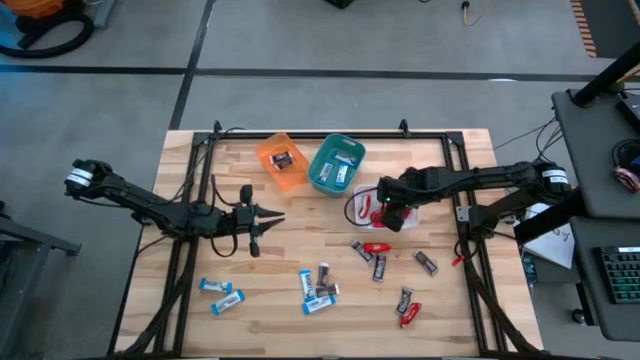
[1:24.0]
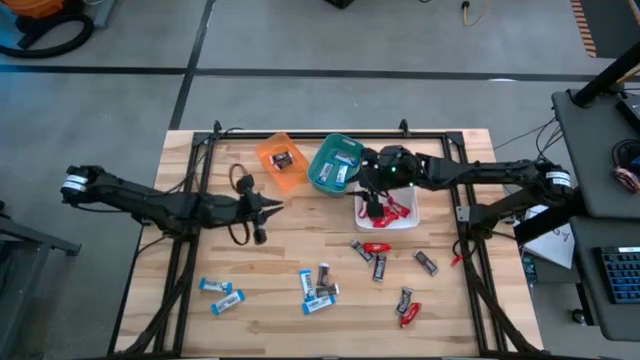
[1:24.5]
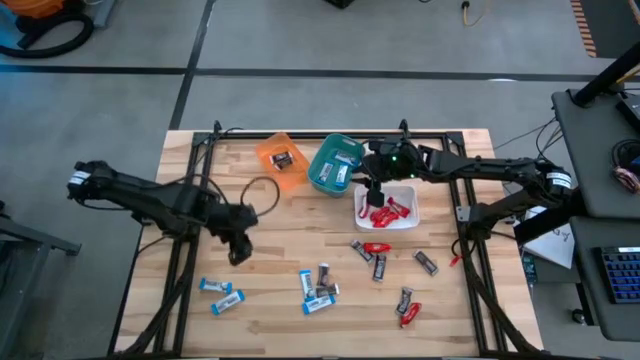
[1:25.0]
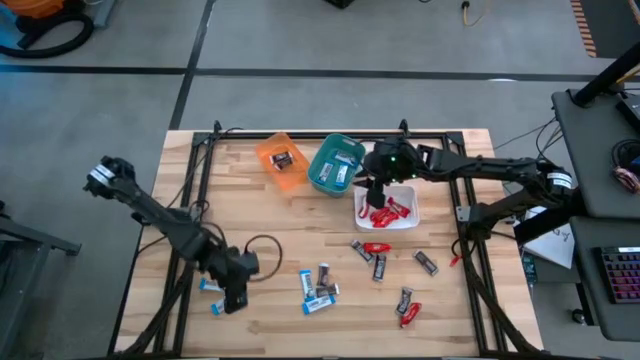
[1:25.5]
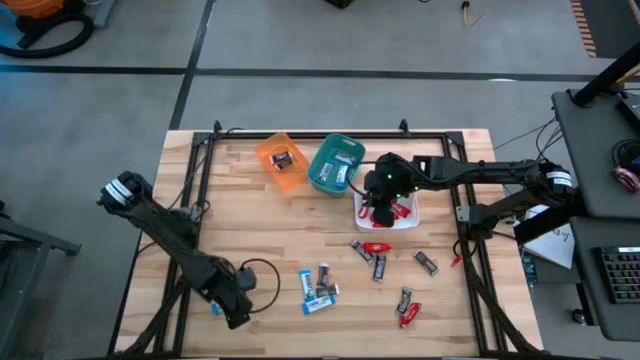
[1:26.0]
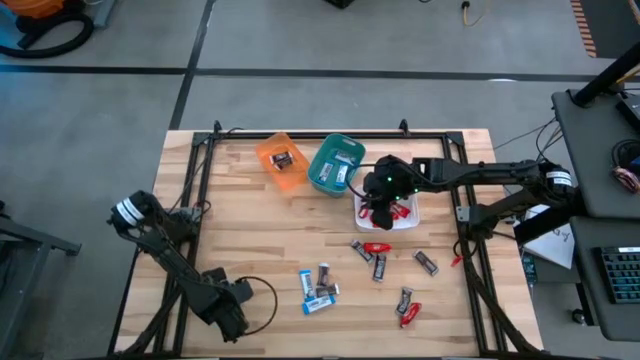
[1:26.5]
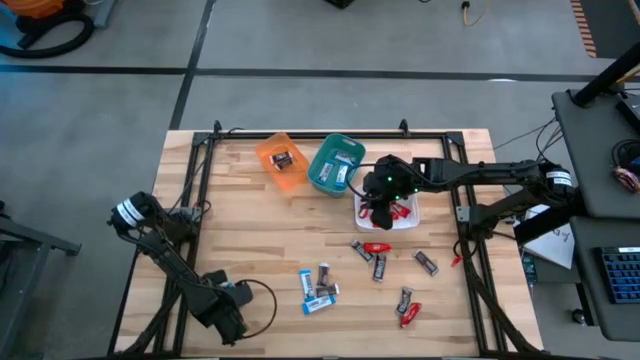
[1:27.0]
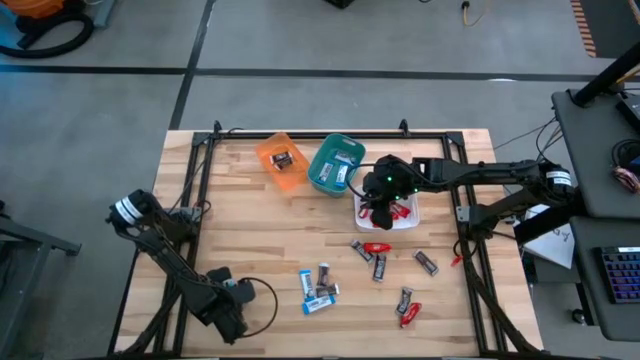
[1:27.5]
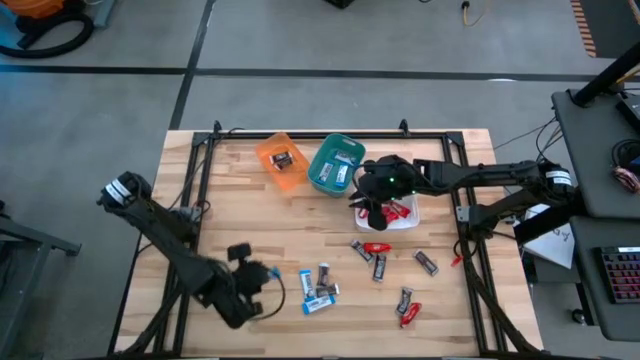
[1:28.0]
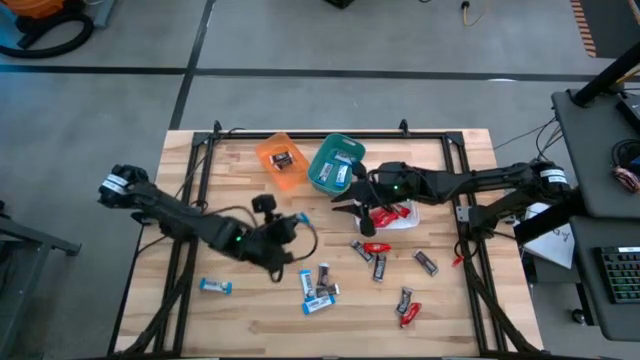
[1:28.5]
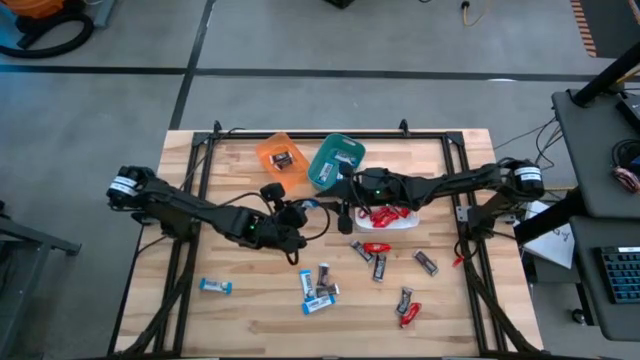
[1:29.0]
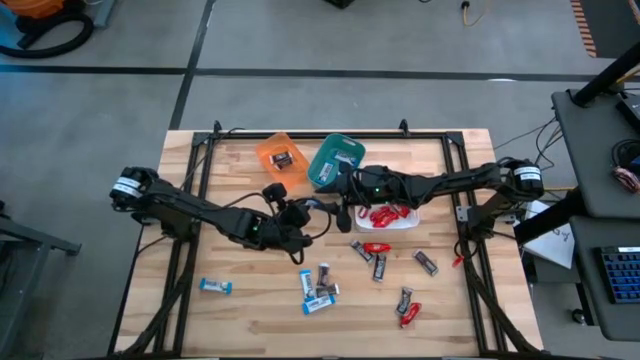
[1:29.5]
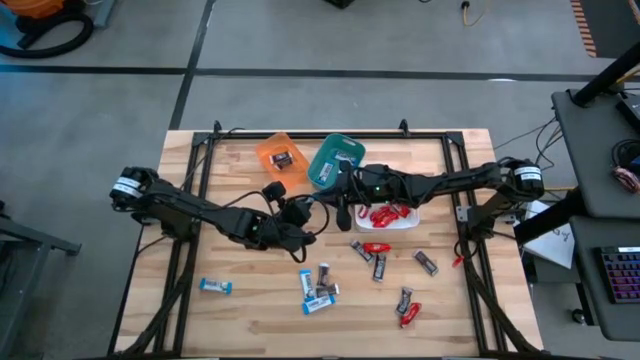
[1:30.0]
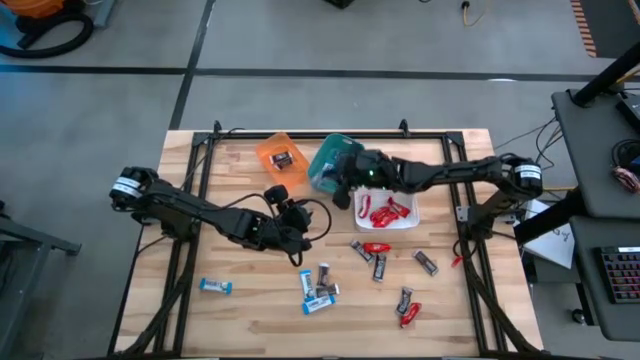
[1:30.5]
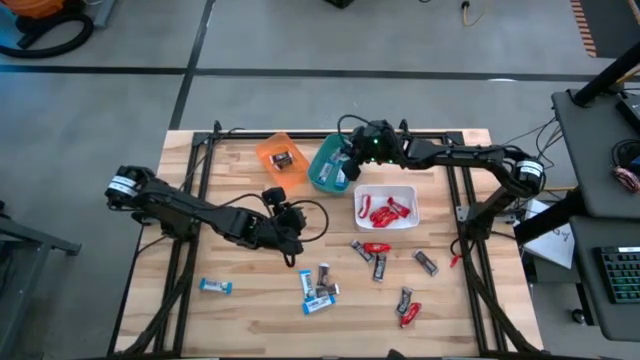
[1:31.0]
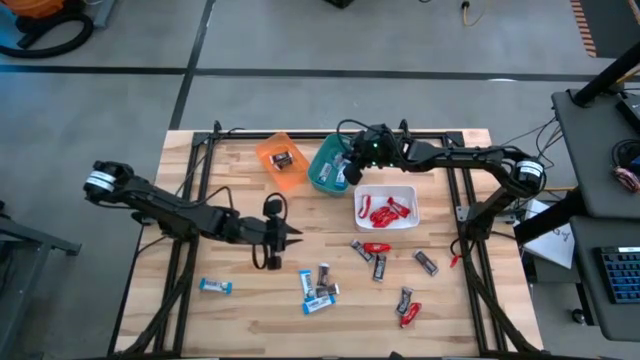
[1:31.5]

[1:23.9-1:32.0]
Task: Sort candy
Put the white chocolate bar into the green bin

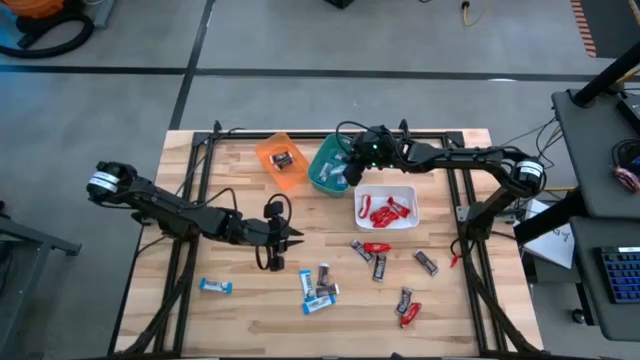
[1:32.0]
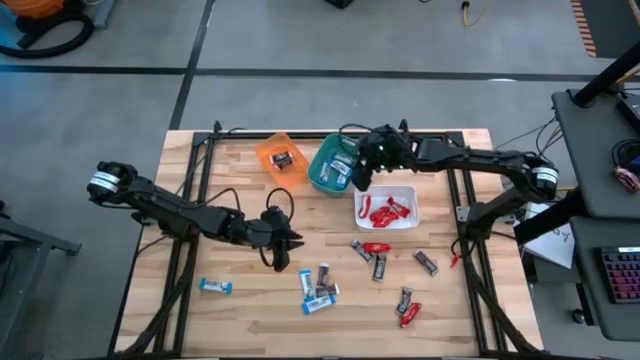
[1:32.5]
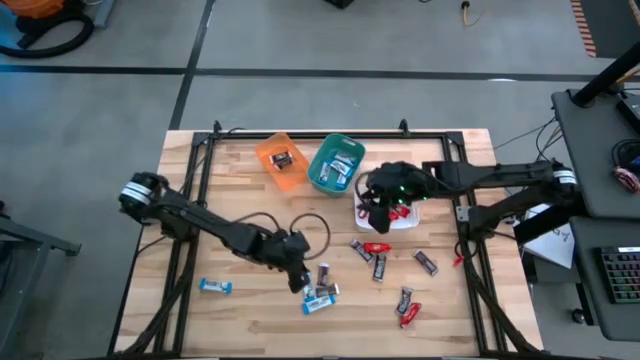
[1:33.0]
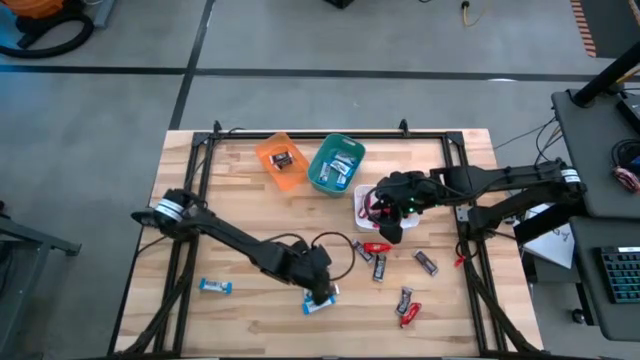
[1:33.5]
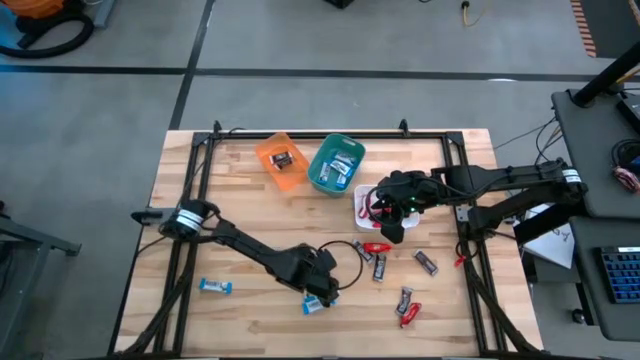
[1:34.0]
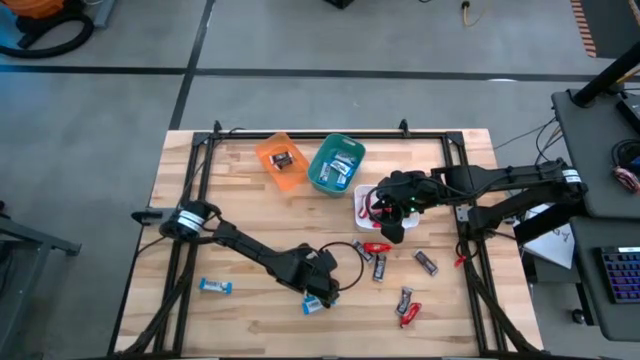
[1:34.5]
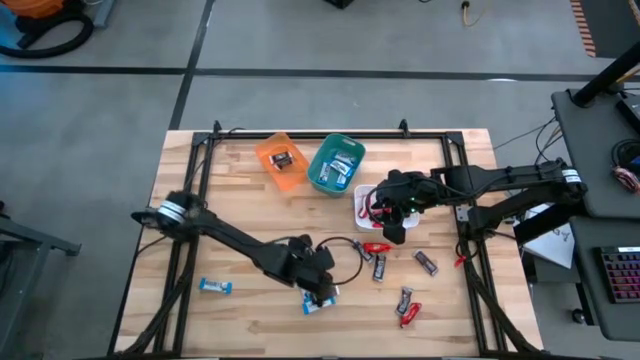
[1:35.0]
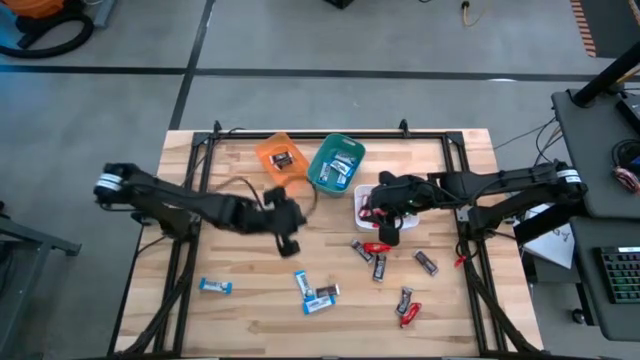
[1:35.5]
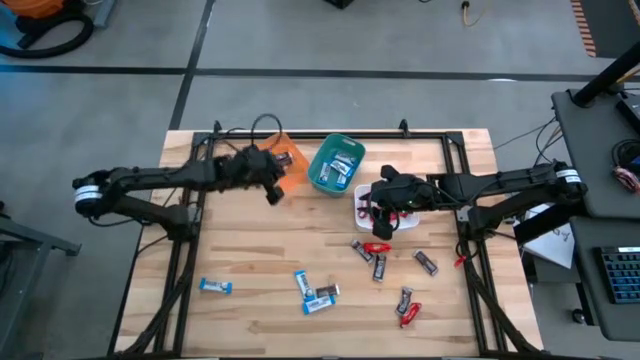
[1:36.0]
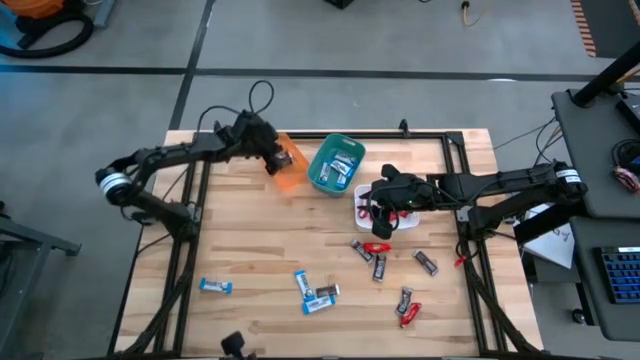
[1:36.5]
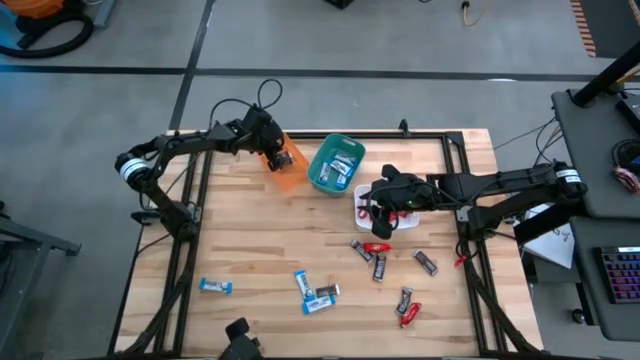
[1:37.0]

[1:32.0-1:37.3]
Put the brown chocolate bar into the orange bin

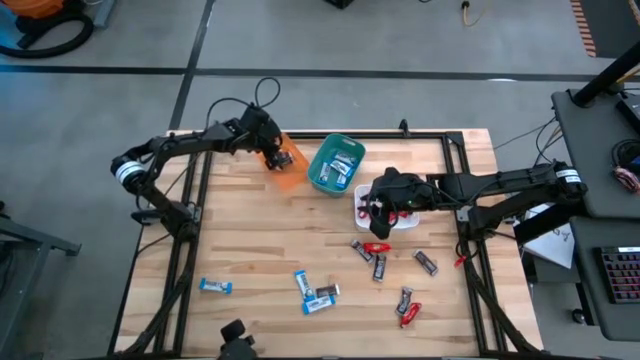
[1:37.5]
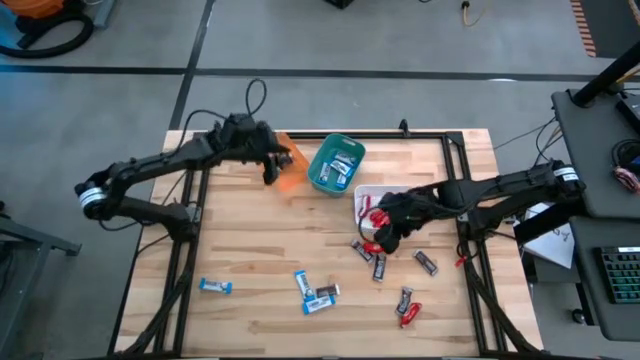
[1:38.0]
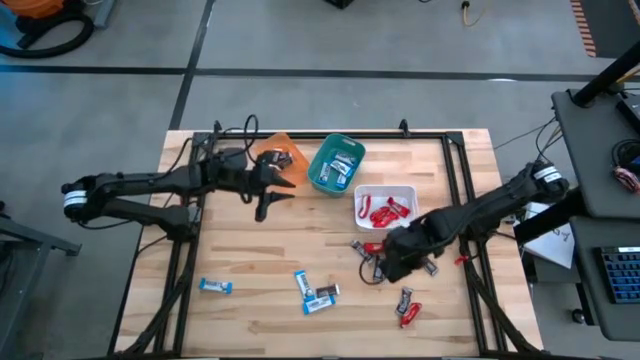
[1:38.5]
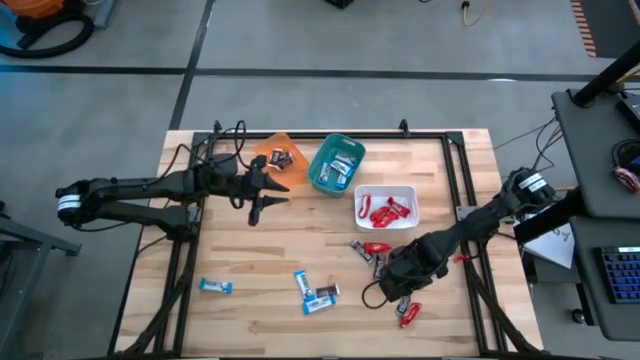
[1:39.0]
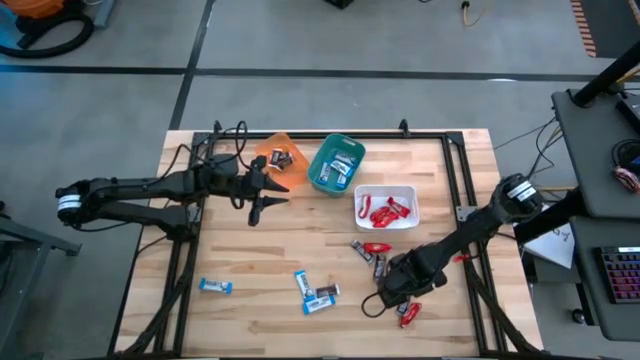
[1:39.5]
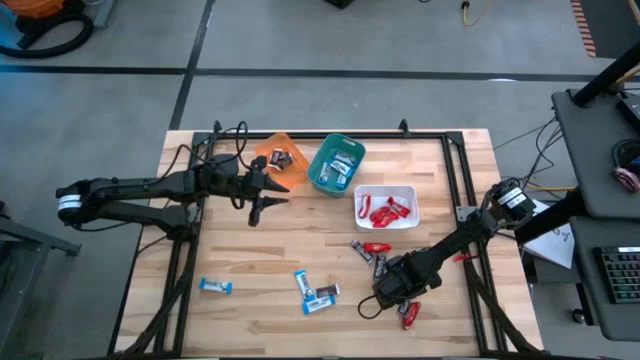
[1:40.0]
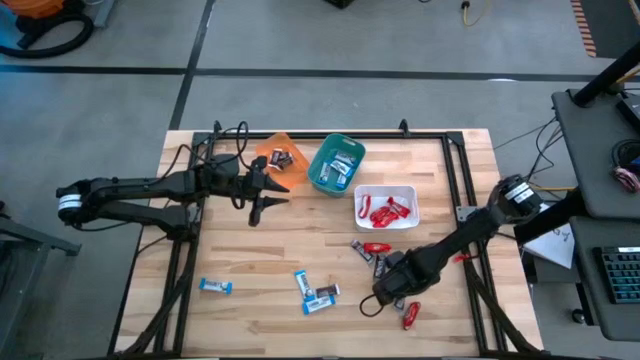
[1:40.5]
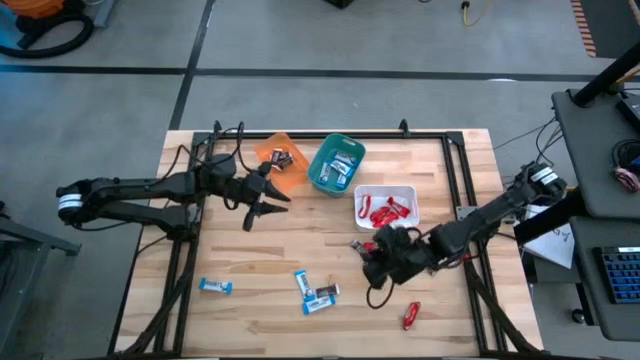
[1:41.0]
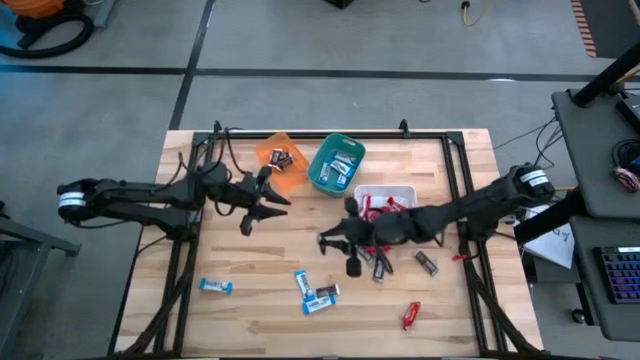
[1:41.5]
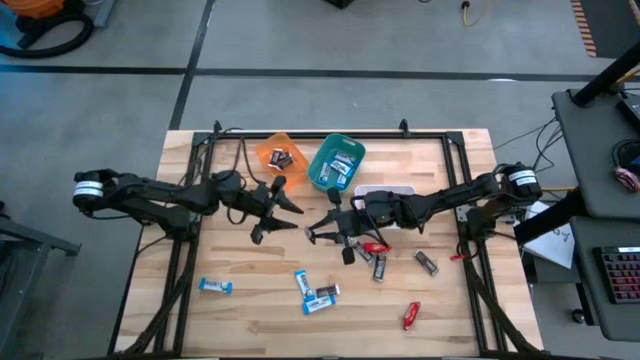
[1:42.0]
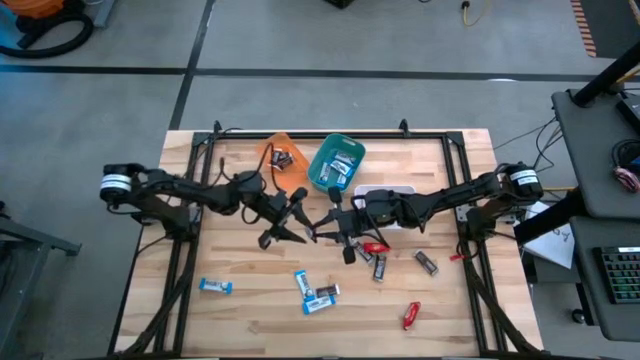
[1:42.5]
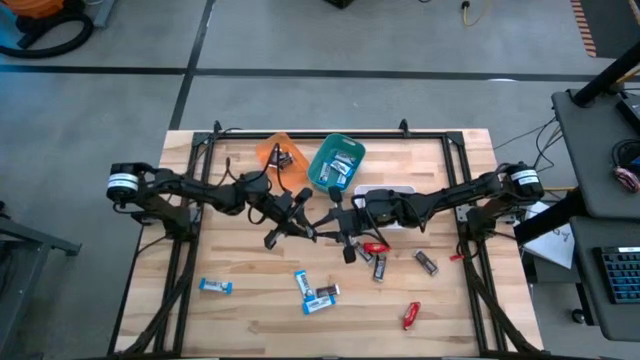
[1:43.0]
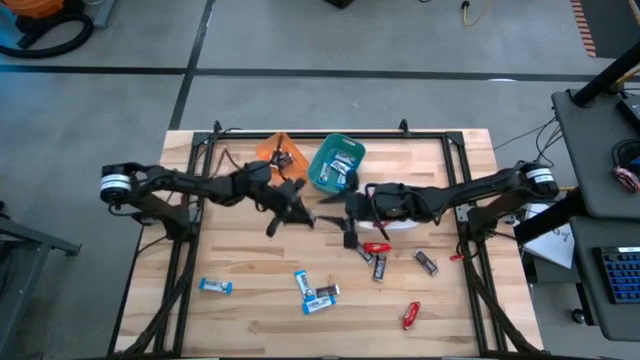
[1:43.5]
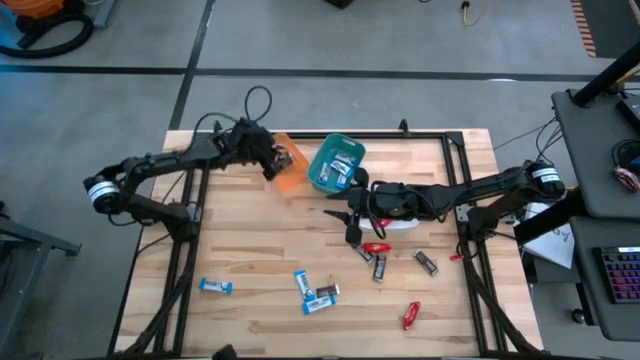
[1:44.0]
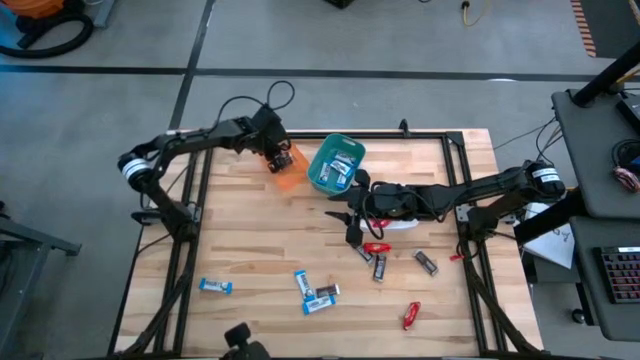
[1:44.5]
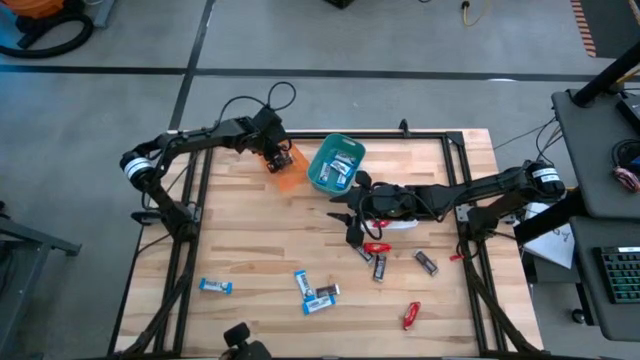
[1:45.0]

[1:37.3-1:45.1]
Put the brown chocolate bar into the orange bin
